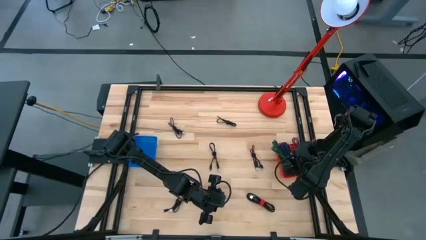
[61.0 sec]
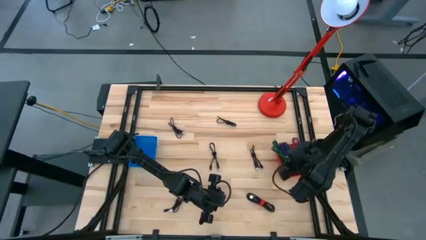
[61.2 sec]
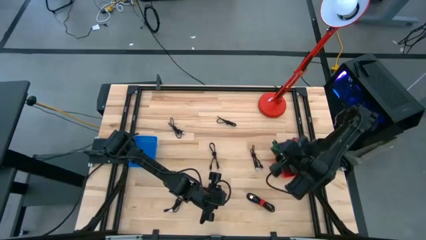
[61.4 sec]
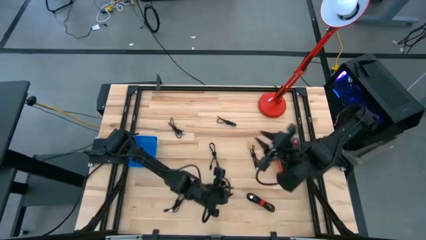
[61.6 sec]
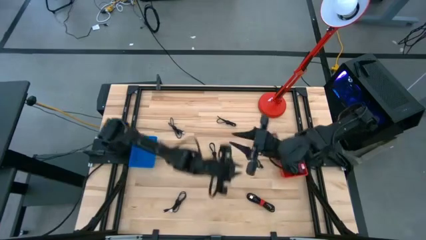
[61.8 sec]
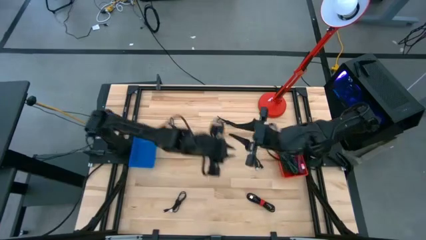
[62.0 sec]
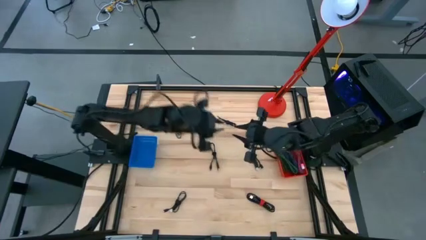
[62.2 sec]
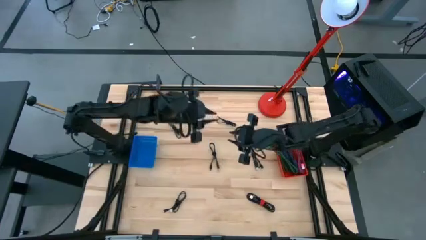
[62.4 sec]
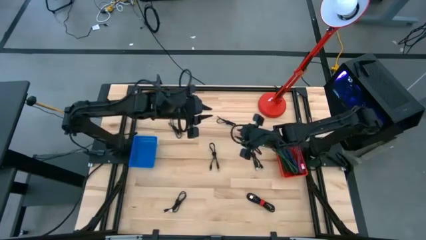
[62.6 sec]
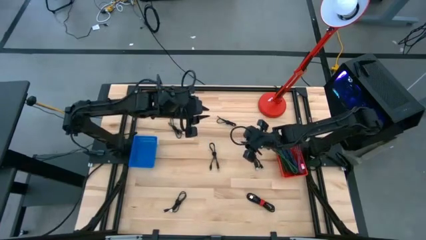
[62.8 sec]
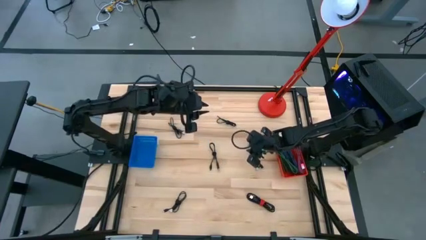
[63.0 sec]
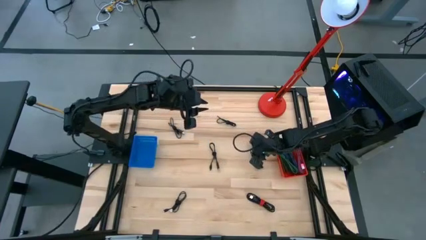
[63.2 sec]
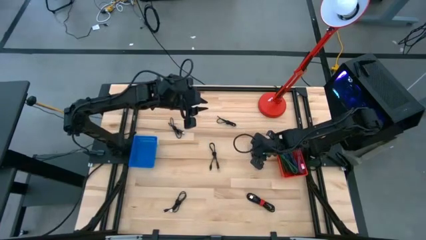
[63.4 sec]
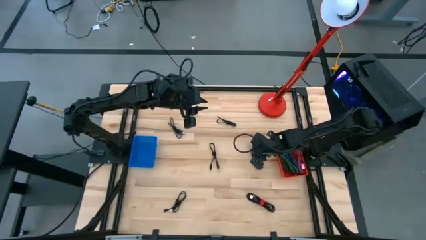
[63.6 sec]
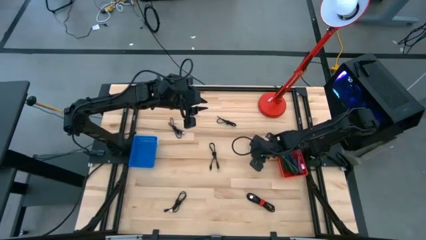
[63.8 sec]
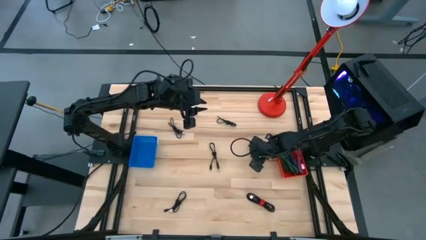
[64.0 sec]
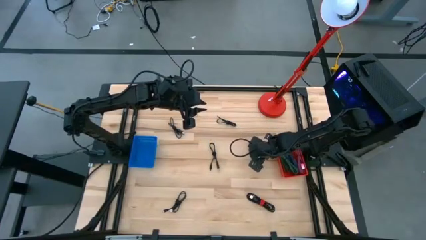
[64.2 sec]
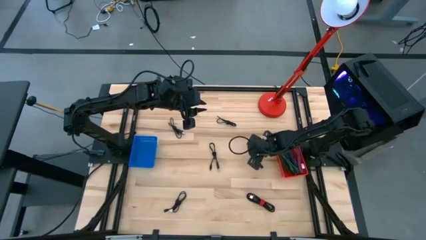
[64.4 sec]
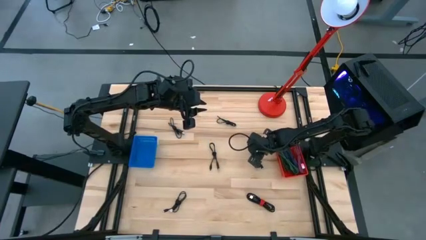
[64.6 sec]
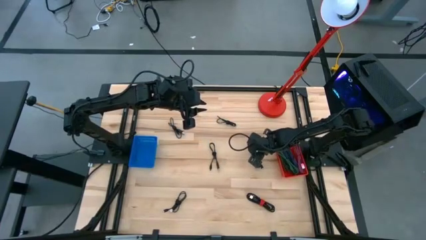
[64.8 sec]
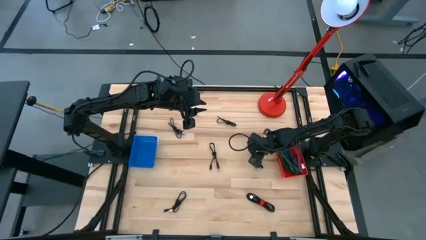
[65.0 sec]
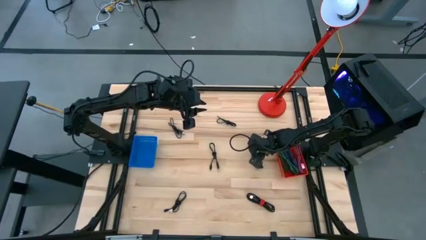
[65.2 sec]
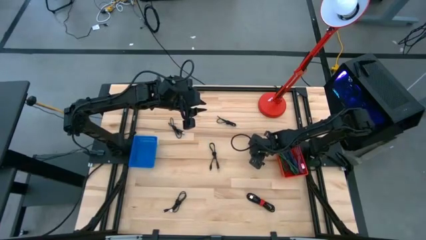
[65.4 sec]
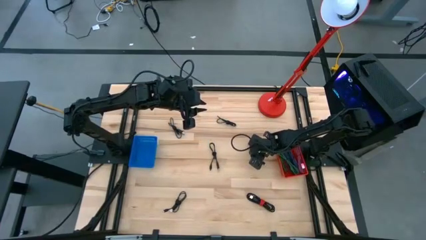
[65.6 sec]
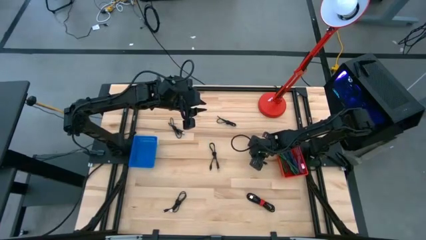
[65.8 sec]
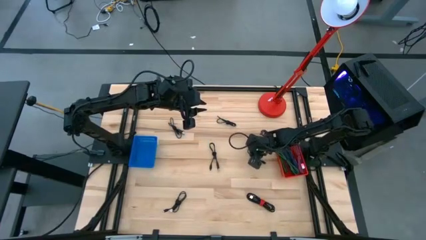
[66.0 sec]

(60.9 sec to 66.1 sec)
Task: Pick & Place USB Port
Put the black charger cable into the blue basket

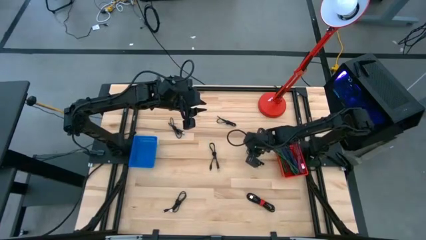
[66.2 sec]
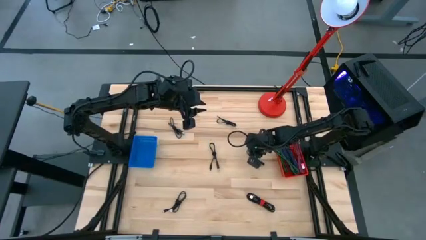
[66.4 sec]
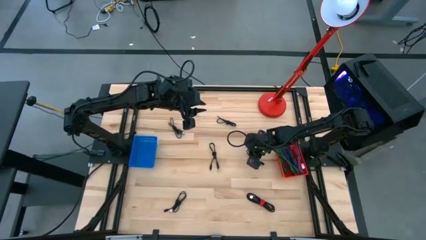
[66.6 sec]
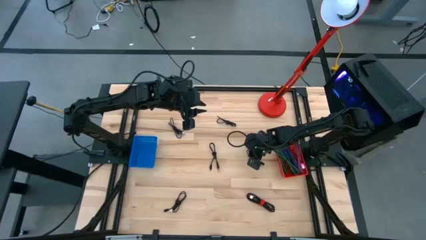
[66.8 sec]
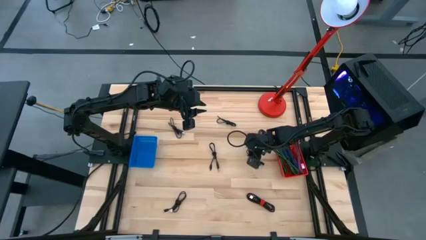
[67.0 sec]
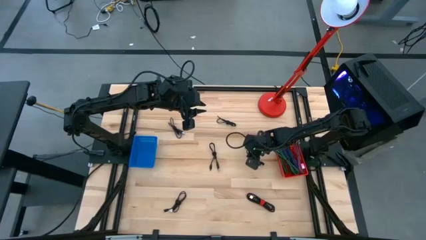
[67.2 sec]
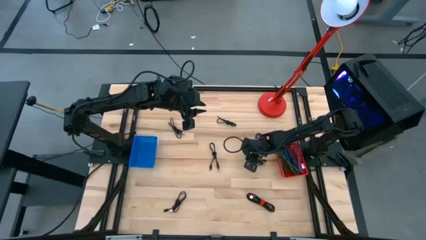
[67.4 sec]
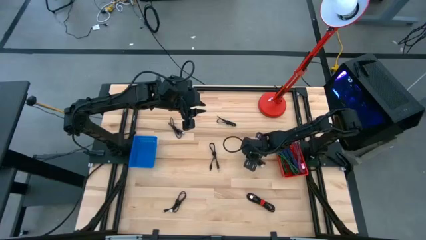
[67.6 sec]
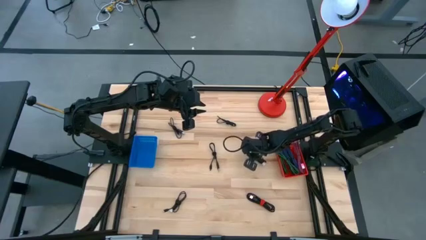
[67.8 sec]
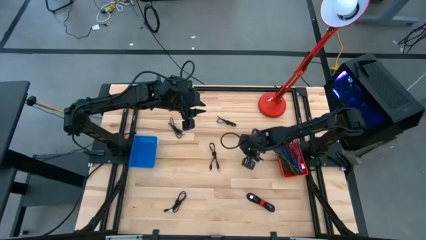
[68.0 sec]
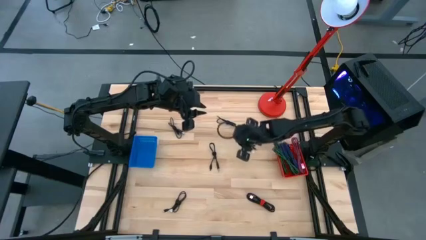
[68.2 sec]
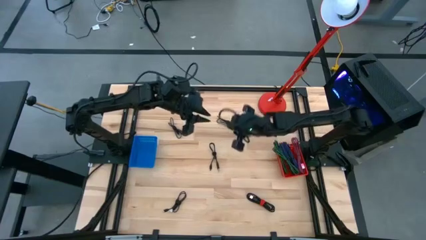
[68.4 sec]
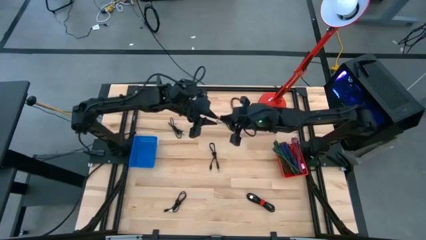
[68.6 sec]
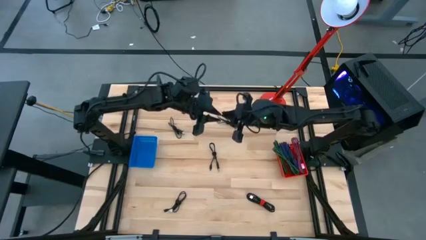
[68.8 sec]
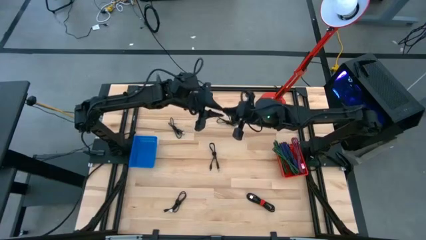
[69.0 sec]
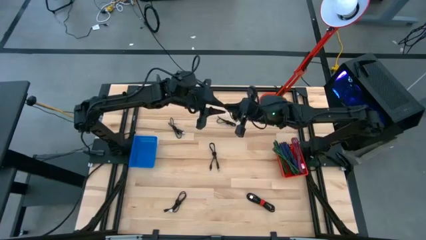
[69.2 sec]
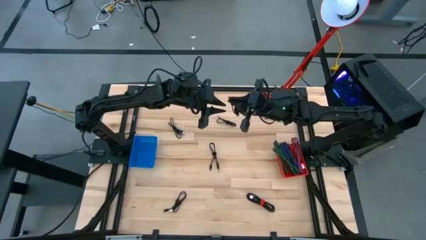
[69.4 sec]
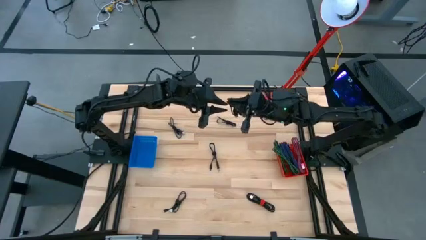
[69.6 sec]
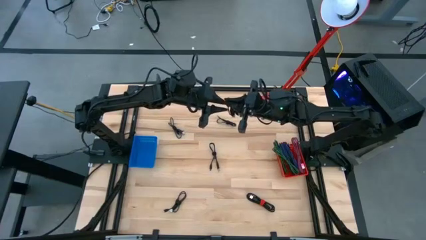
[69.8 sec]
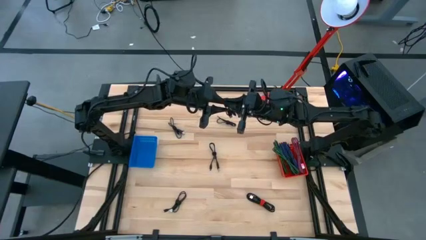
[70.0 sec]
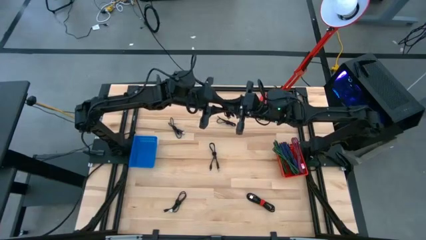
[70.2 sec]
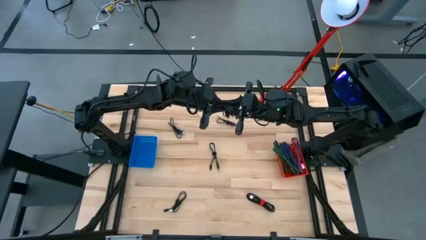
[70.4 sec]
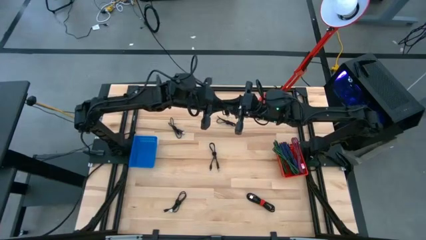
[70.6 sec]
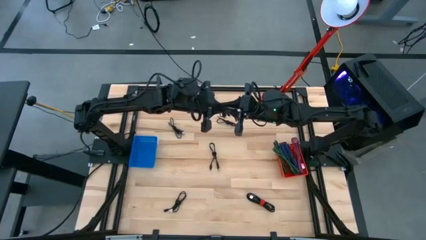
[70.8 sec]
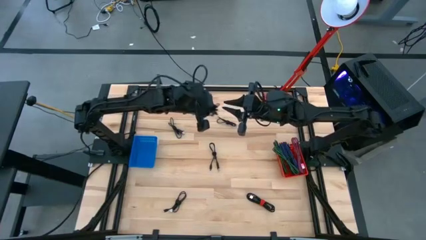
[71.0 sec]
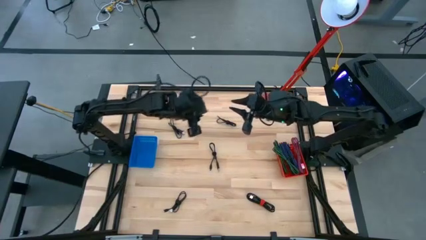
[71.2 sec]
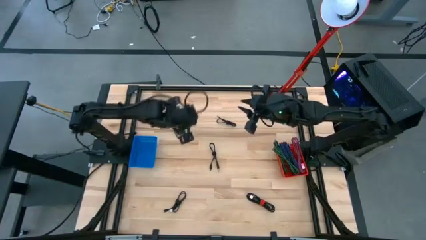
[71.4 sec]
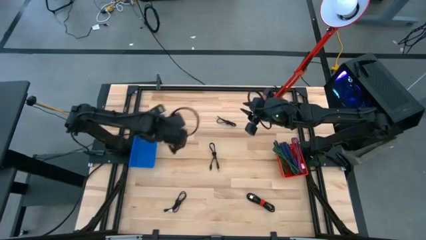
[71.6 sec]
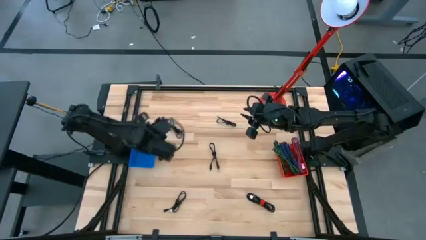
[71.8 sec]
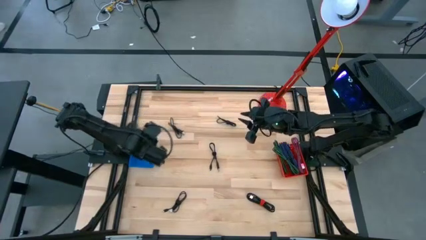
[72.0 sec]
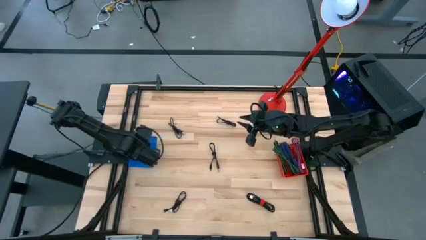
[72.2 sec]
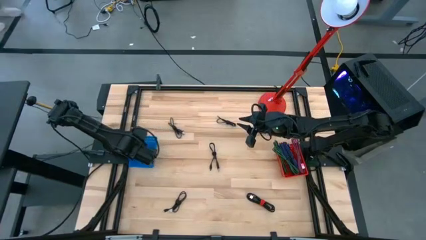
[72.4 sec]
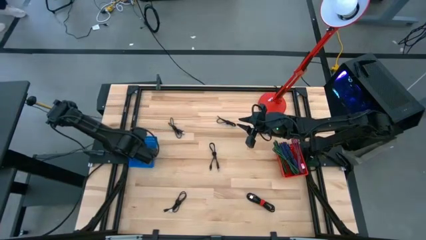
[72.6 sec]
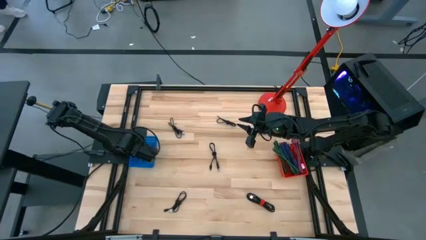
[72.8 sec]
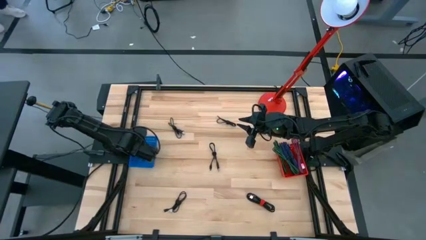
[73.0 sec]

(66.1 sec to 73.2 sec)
Put the black charger cable into the blue basket

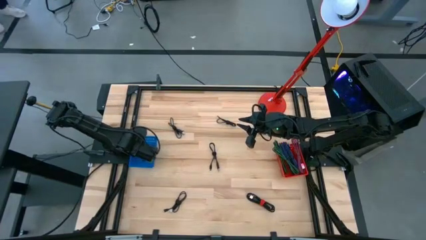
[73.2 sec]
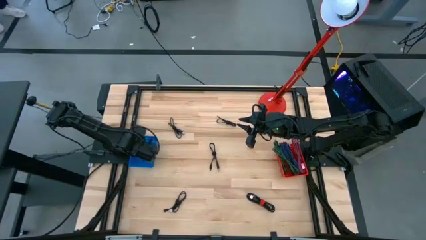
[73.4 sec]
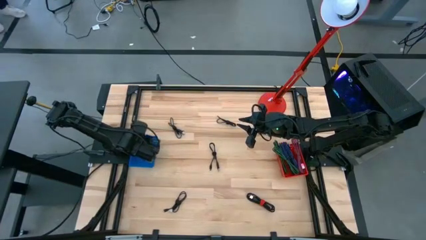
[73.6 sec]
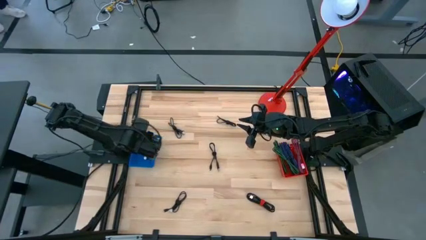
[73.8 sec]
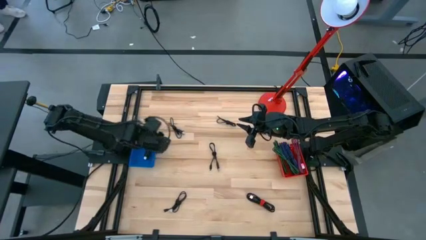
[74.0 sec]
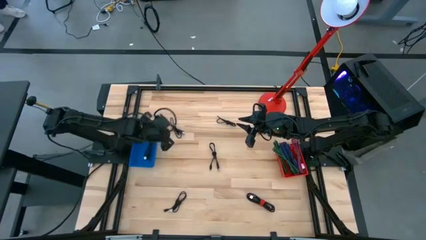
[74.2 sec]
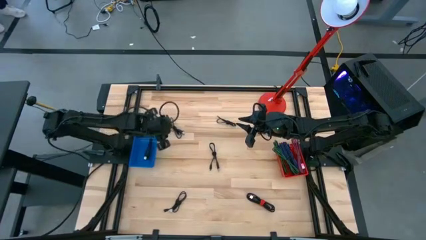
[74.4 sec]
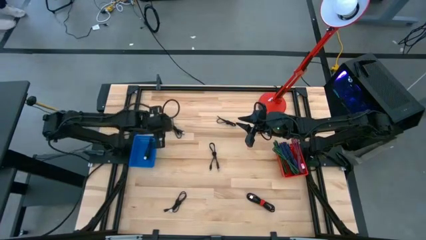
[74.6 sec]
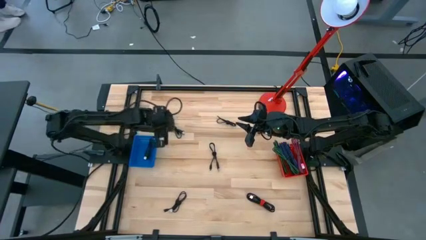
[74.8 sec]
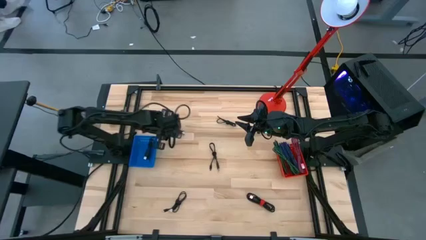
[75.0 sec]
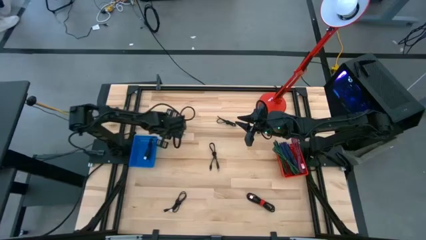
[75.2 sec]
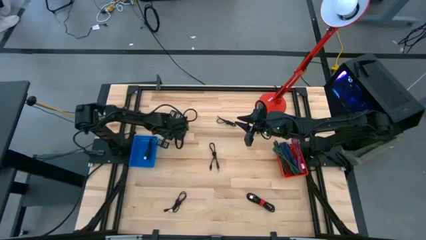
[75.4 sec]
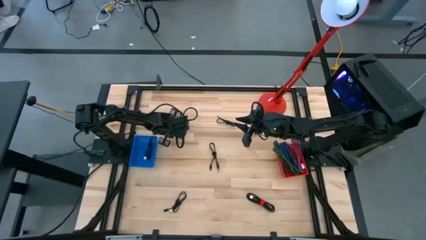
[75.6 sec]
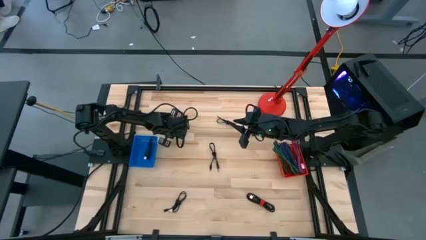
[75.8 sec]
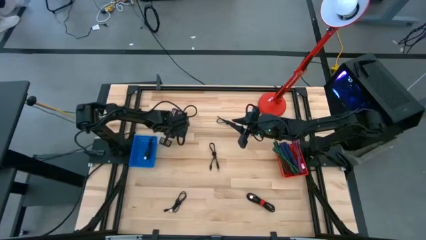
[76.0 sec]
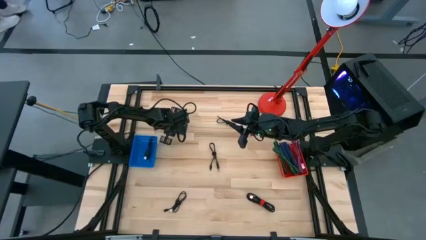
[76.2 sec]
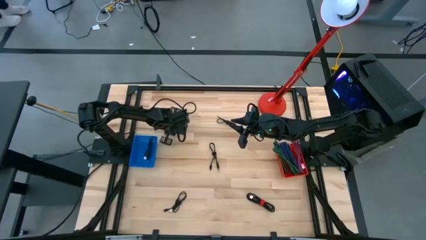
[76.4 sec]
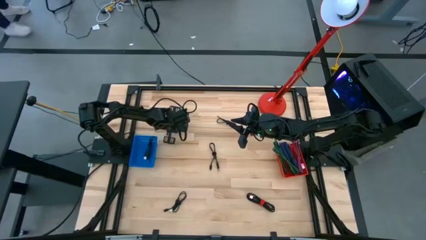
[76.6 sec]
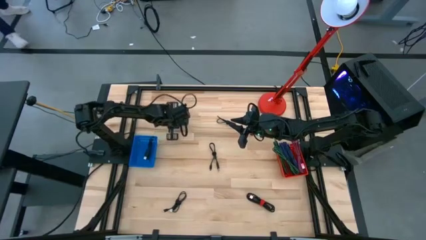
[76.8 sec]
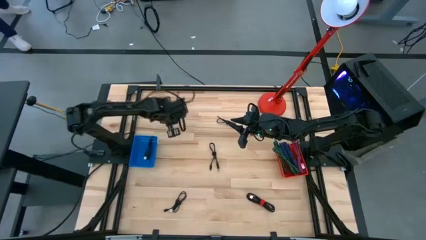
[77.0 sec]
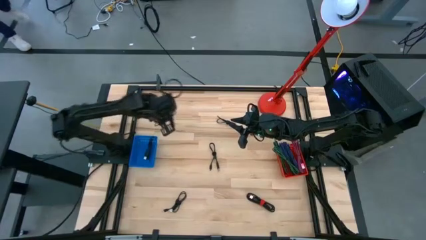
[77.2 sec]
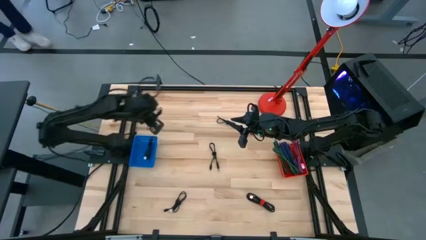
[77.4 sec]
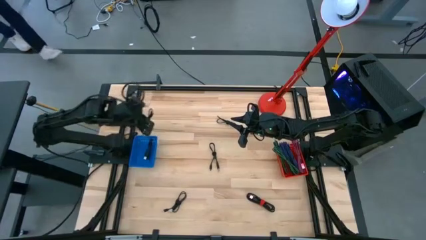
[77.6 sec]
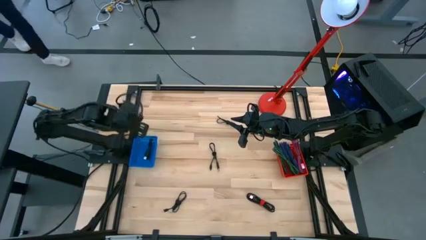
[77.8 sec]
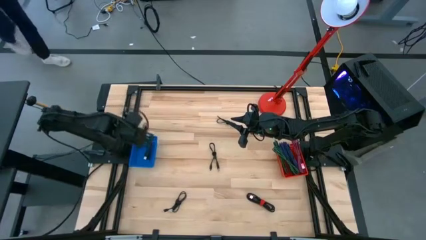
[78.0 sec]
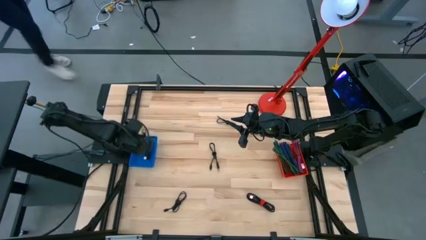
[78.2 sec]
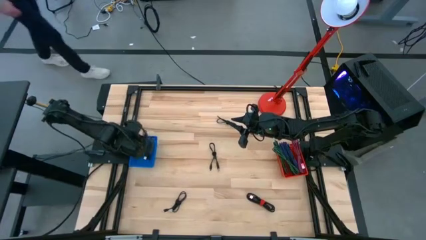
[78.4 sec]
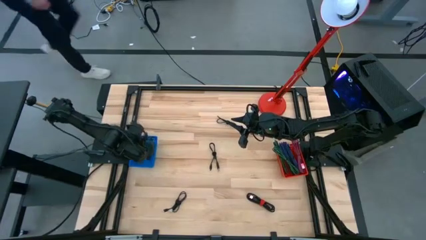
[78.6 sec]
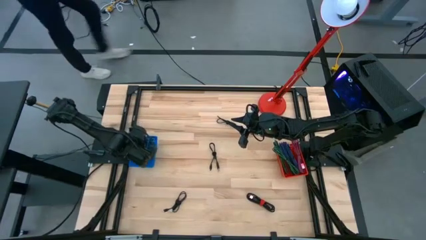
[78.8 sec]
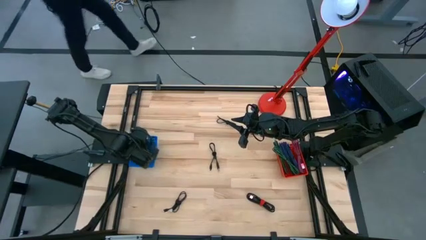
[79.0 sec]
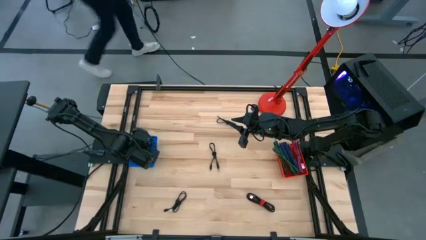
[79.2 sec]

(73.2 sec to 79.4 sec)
Put the black charger cable into the blue basket
